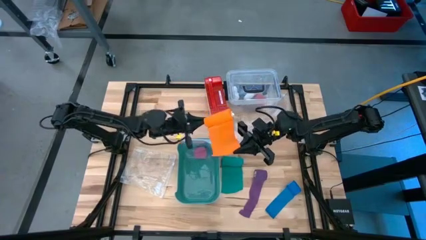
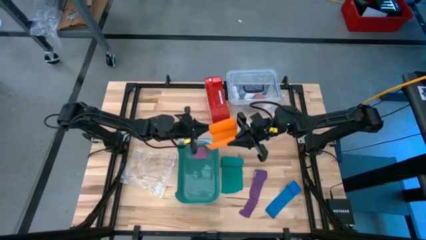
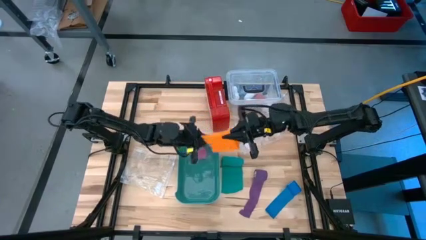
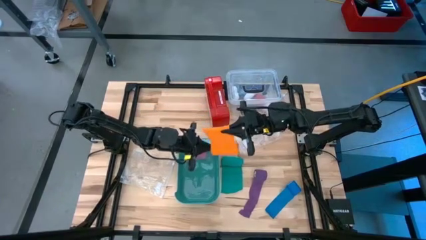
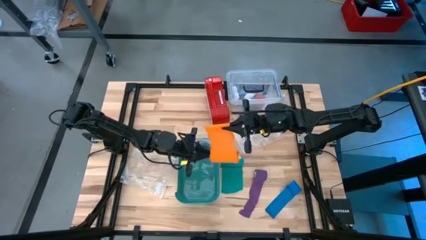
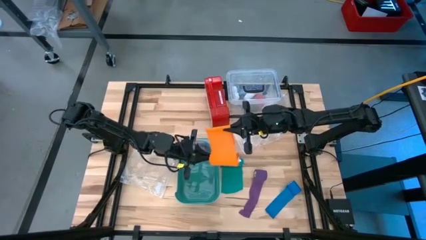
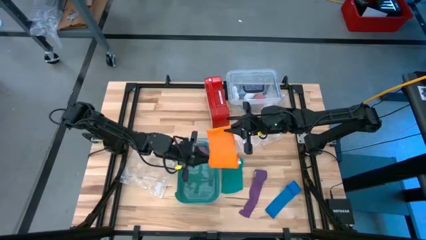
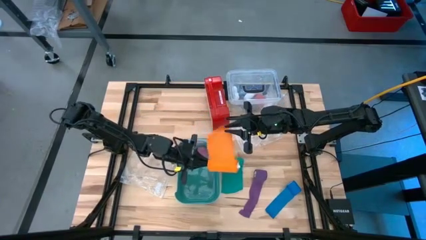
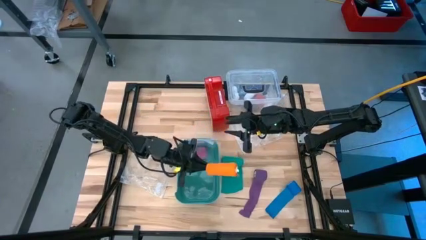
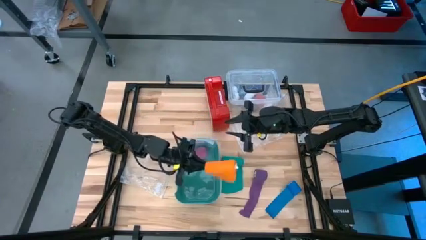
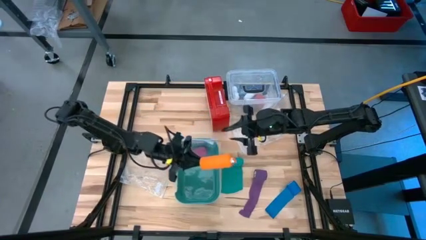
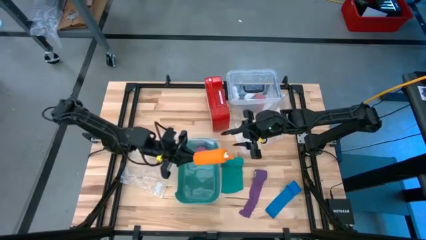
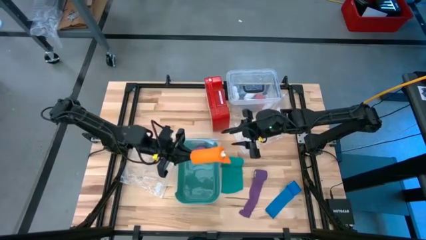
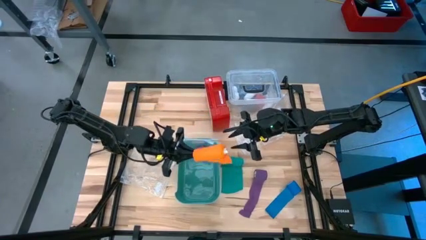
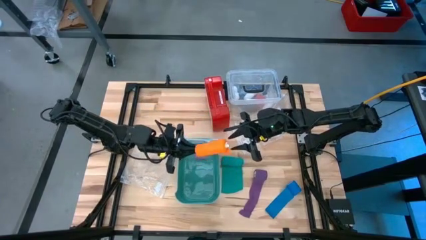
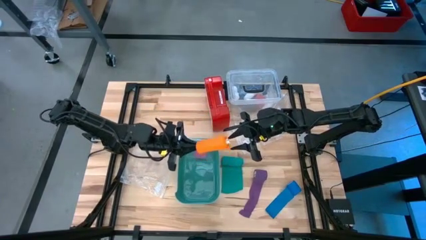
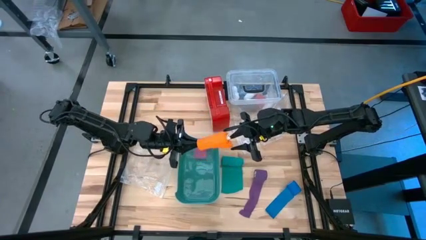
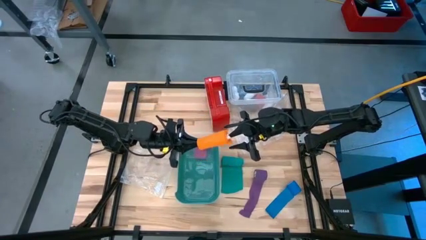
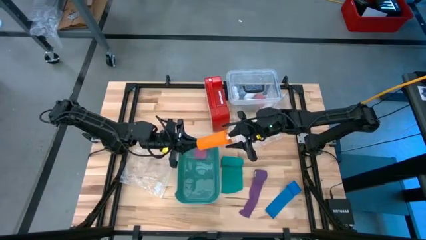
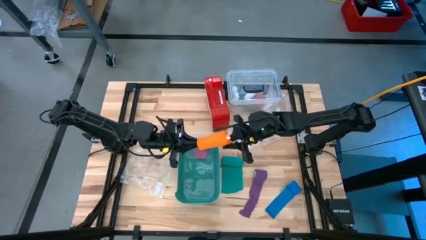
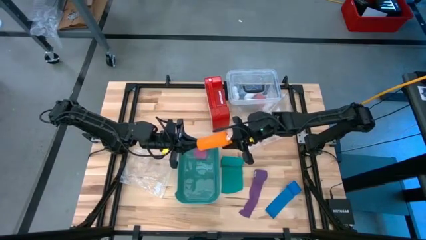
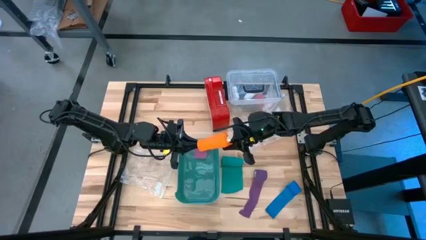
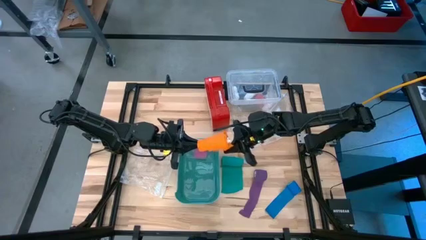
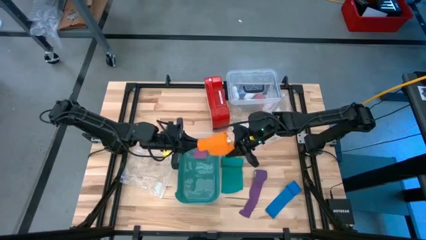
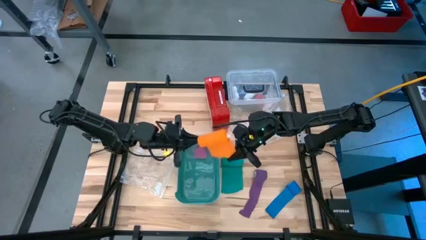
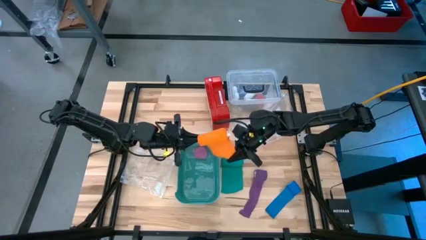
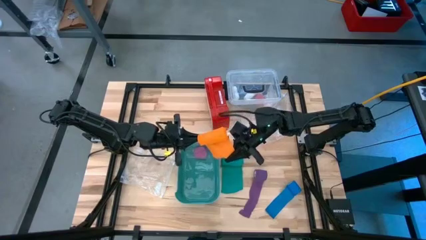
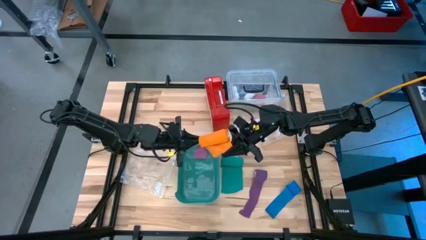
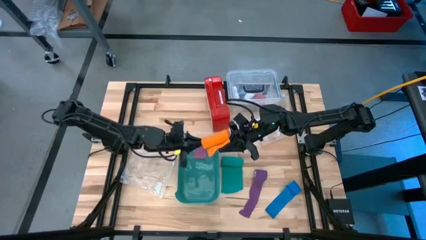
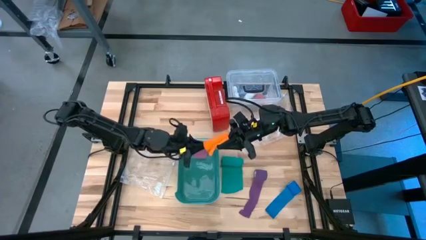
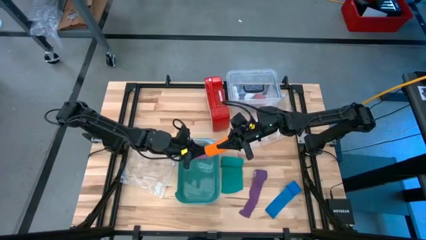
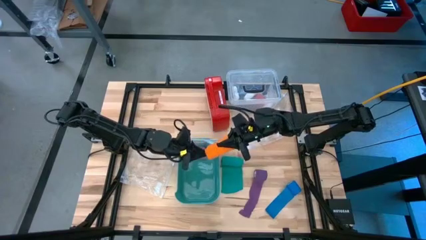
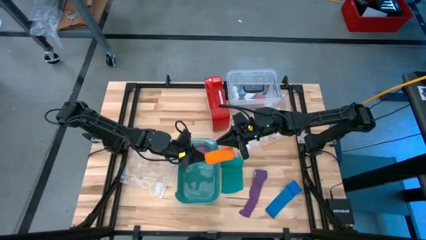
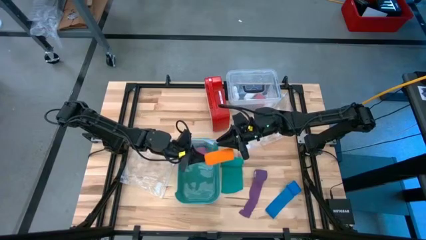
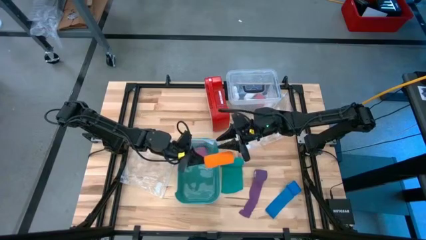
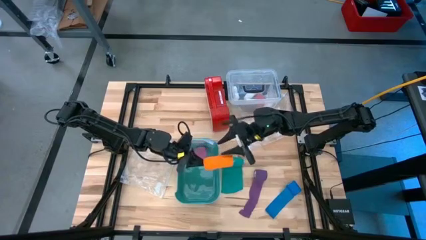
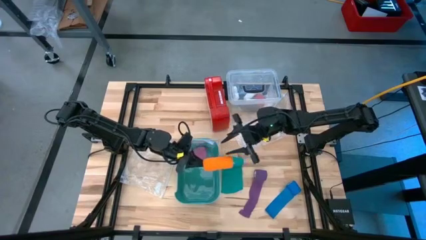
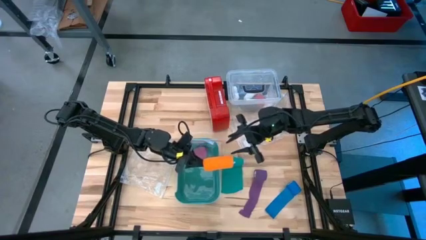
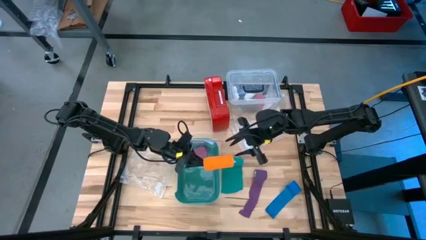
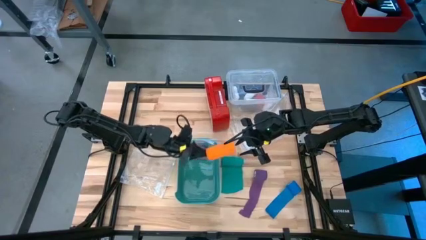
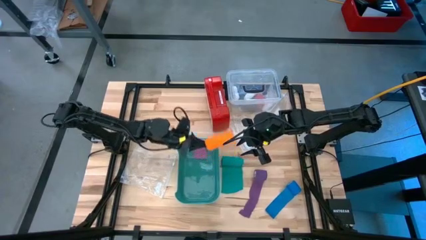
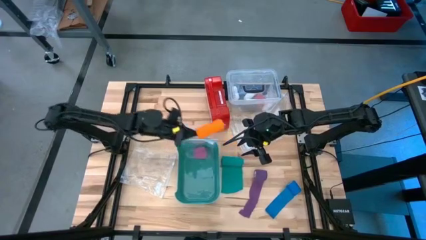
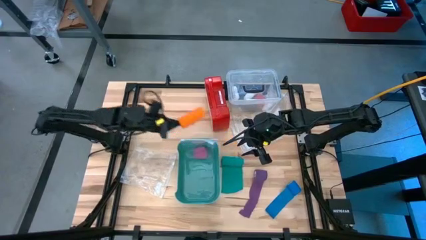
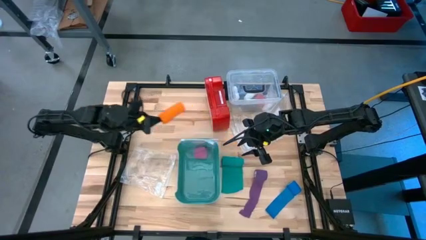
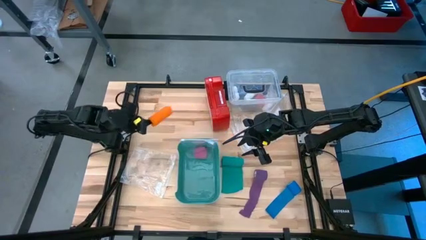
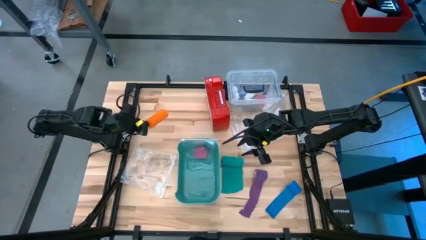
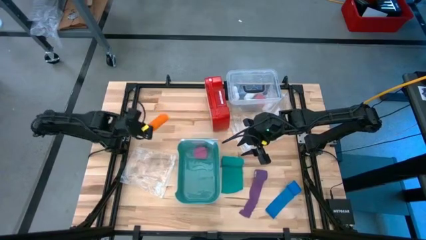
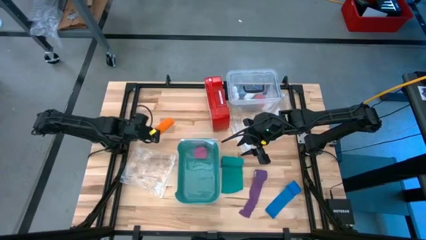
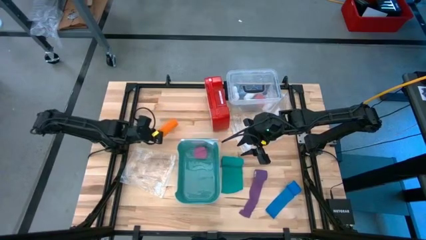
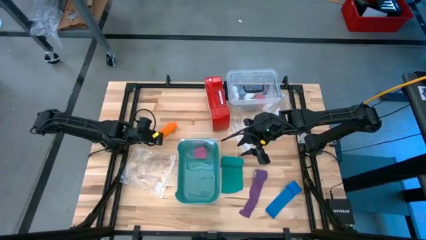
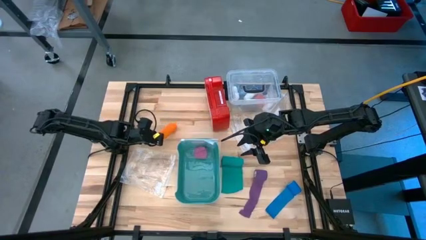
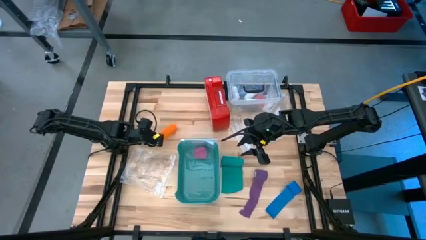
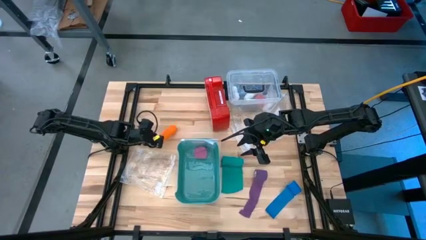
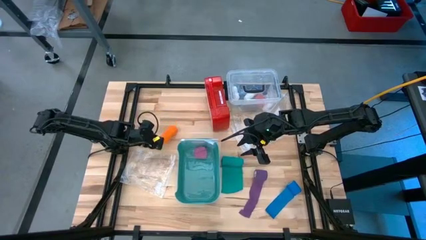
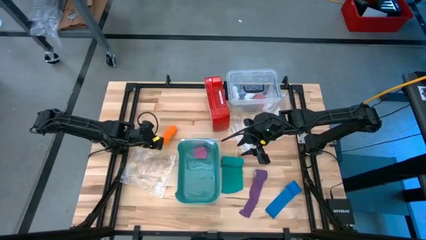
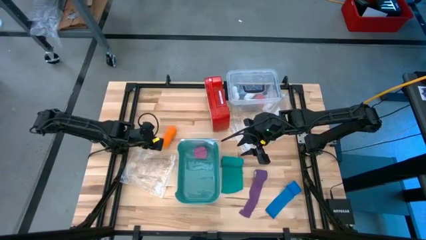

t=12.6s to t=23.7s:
Task: Roll bandage
Roll the orange bandage
